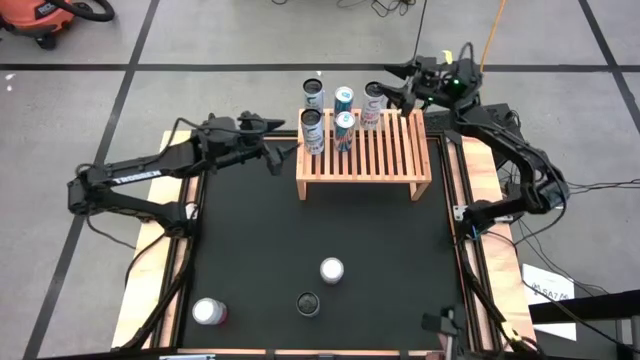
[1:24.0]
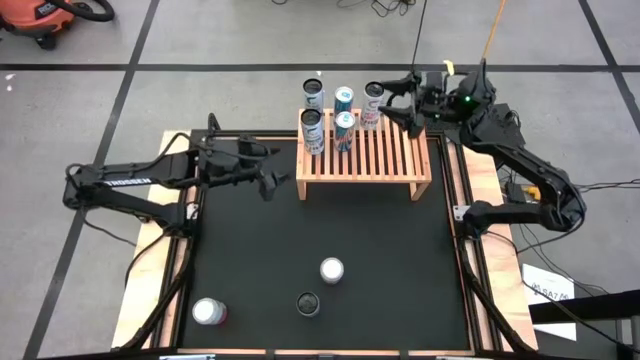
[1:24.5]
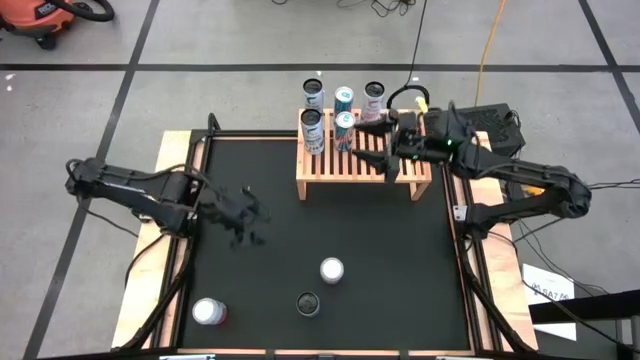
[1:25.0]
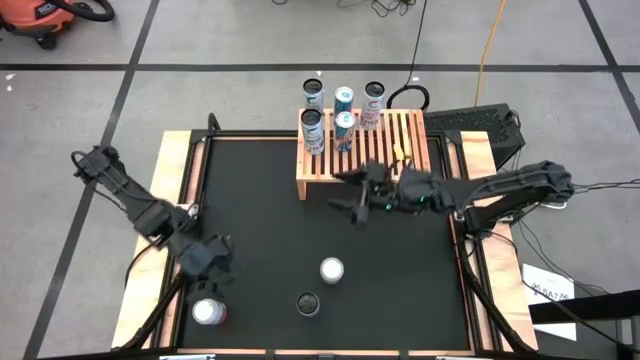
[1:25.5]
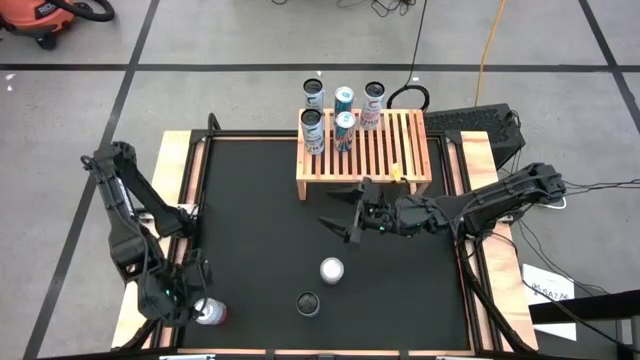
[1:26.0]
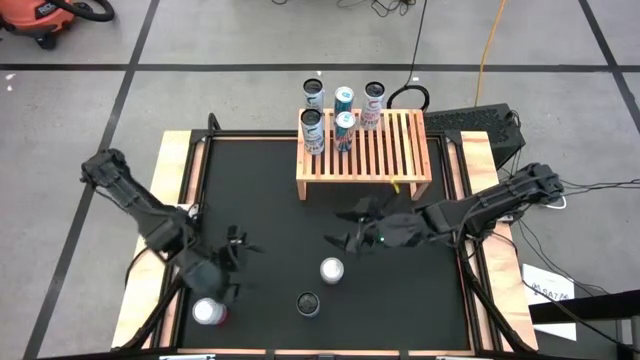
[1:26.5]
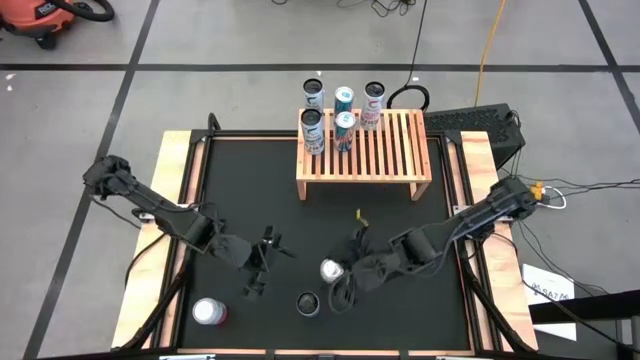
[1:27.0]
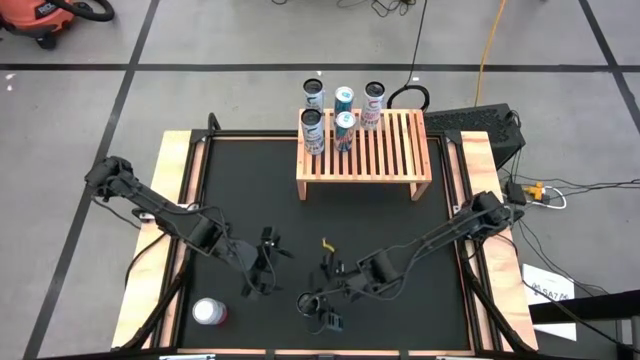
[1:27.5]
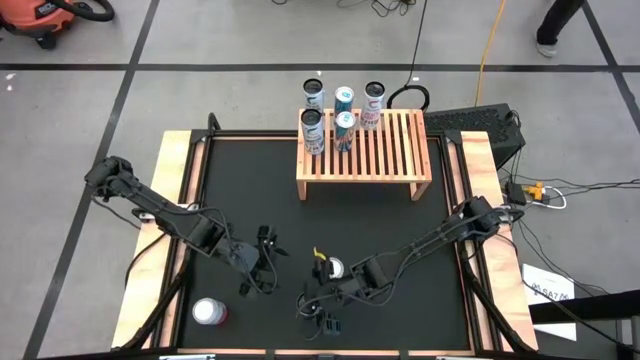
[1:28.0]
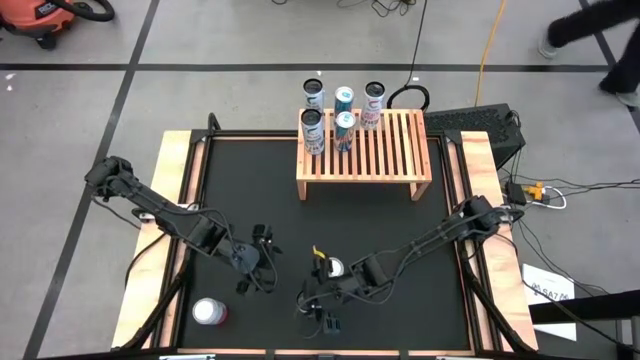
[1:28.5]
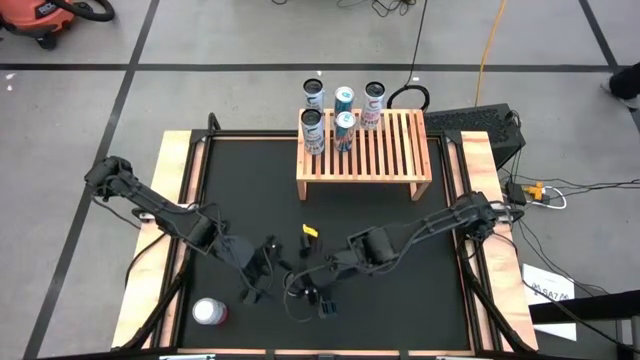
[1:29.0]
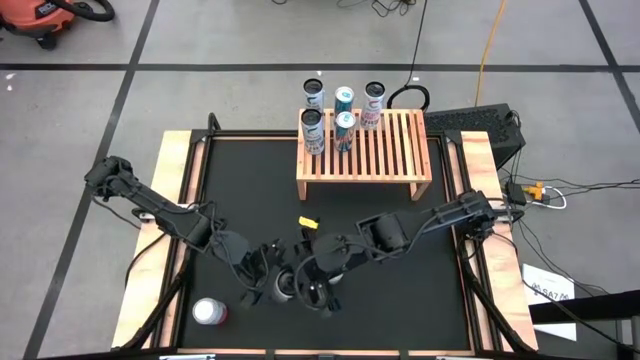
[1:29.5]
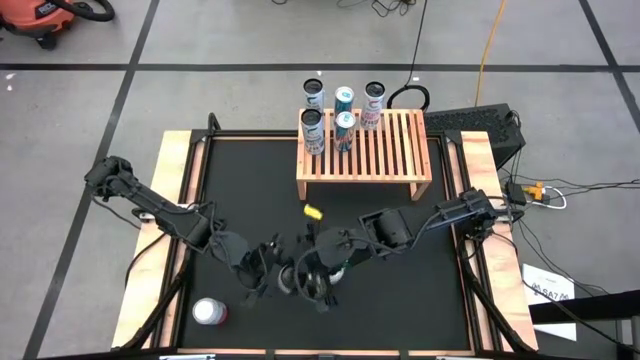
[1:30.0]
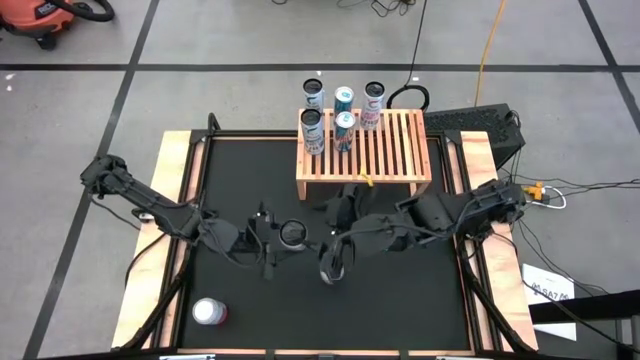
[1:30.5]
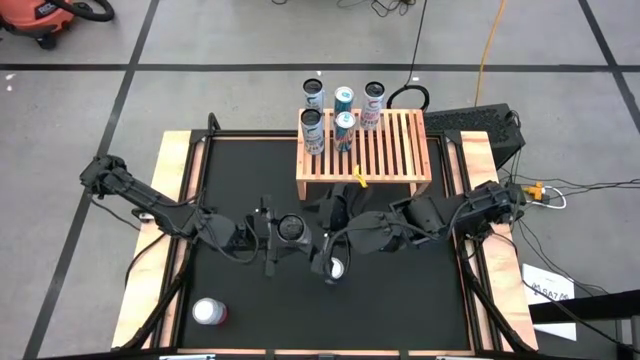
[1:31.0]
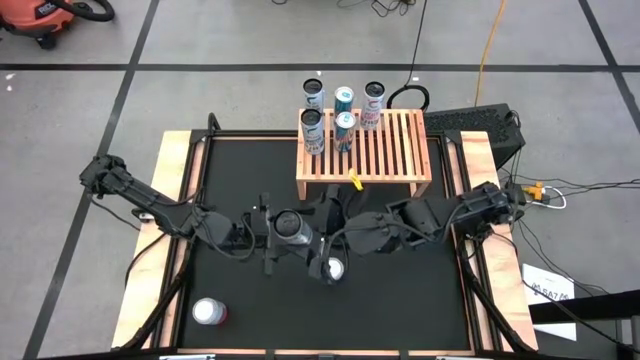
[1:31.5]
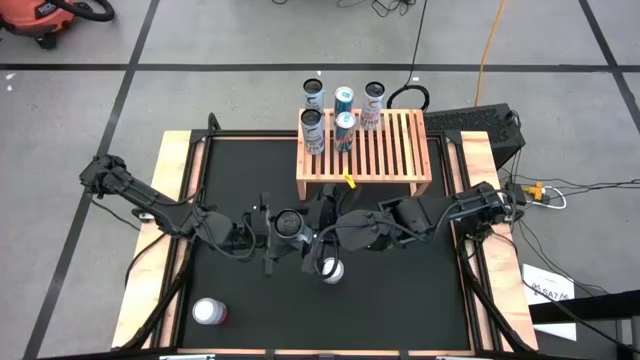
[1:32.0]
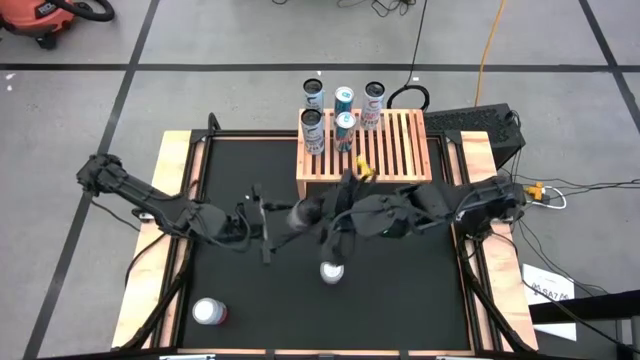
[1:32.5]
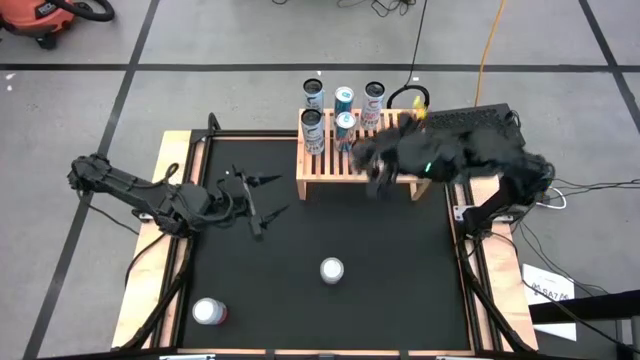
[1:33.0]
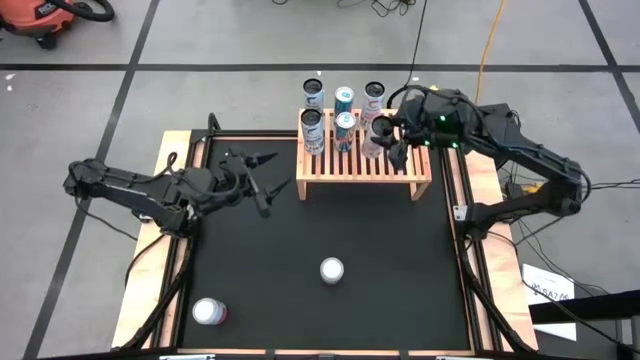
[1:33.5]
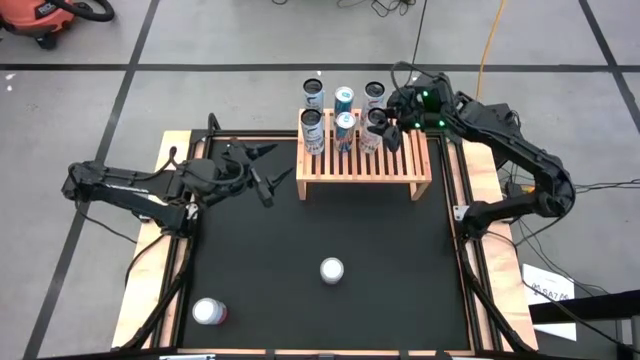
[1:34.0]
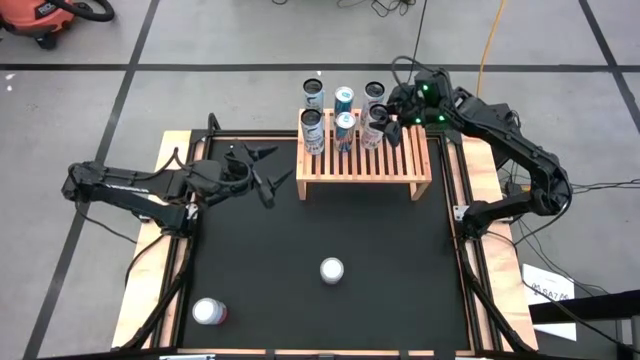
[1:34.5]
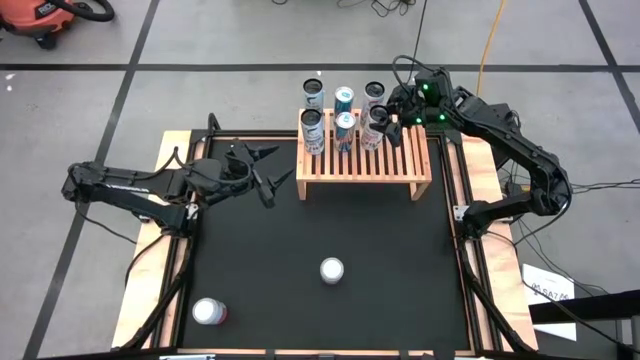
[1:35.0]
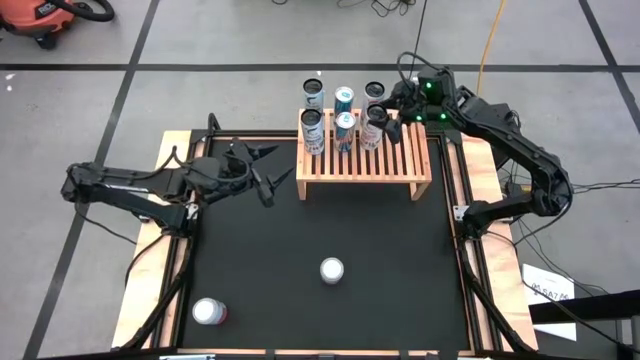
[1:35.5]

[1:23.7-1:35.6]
Task: Place canned beverage on shelf
Put the pink soda can on the shelf aligned with the other pink soda can
